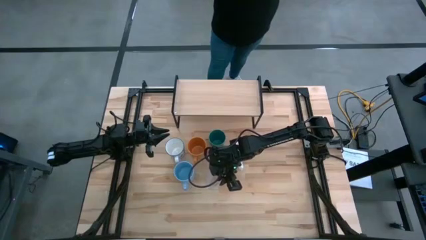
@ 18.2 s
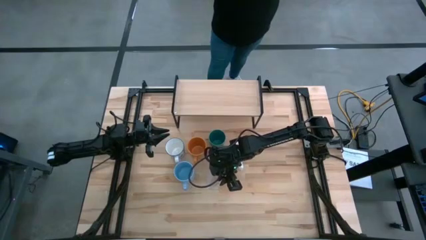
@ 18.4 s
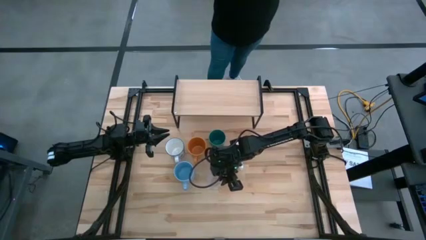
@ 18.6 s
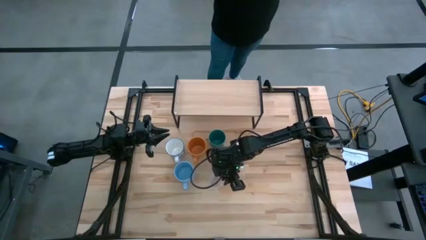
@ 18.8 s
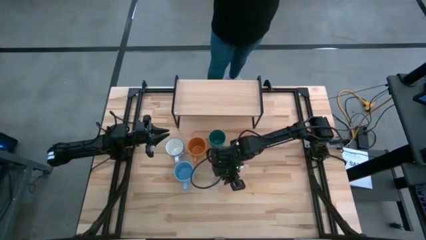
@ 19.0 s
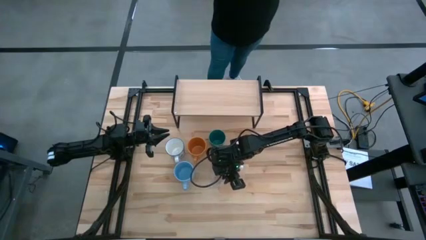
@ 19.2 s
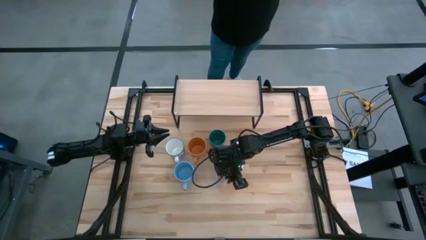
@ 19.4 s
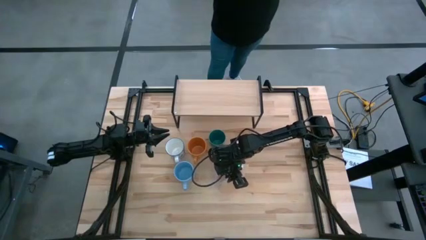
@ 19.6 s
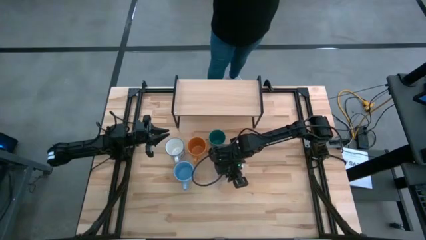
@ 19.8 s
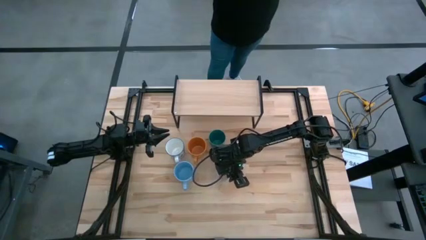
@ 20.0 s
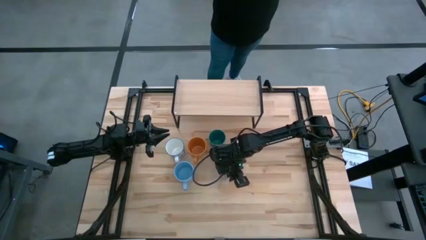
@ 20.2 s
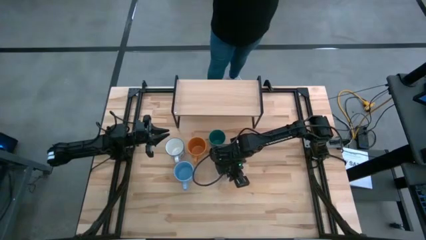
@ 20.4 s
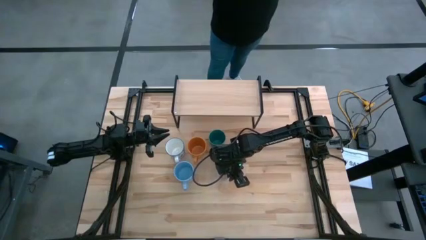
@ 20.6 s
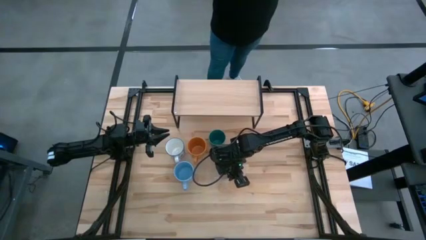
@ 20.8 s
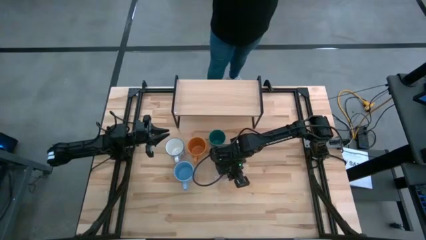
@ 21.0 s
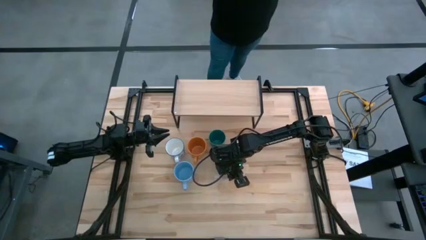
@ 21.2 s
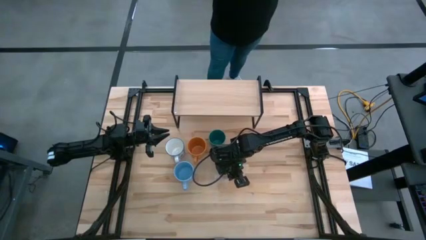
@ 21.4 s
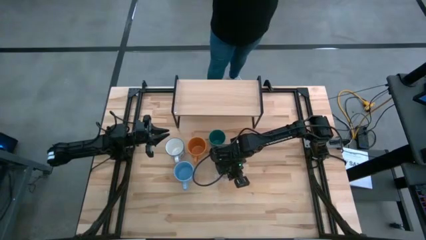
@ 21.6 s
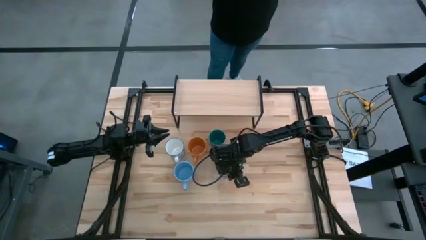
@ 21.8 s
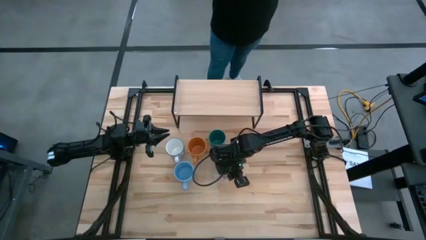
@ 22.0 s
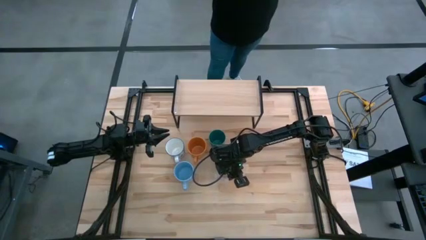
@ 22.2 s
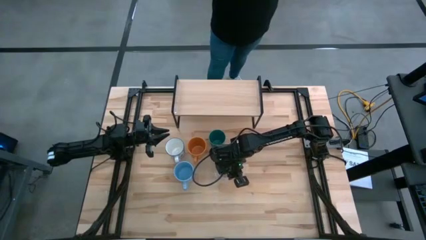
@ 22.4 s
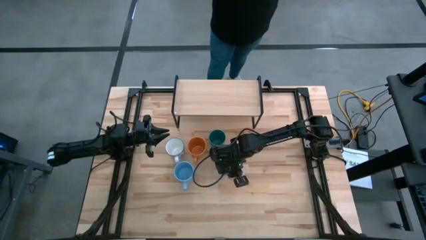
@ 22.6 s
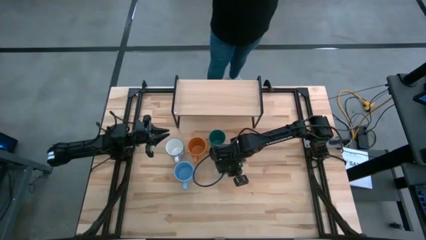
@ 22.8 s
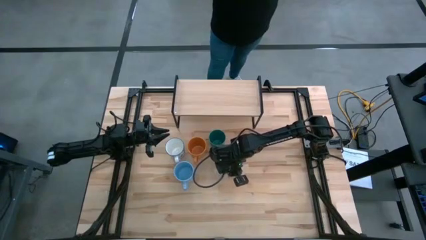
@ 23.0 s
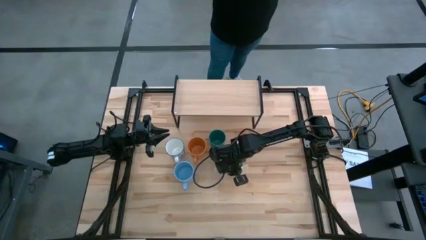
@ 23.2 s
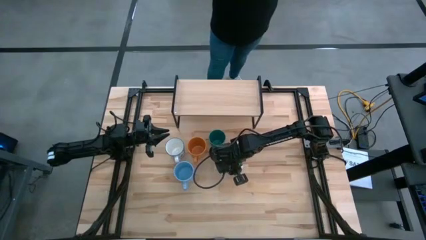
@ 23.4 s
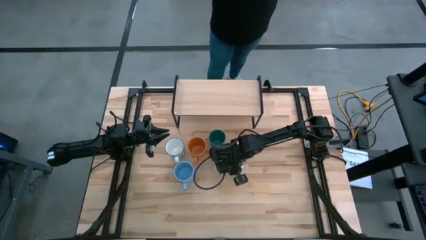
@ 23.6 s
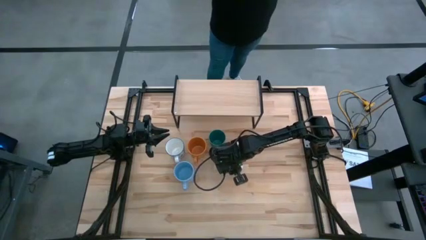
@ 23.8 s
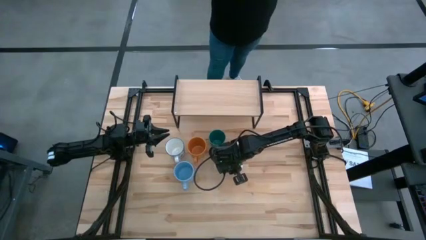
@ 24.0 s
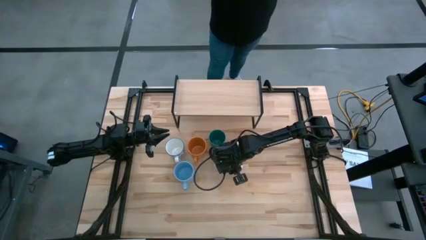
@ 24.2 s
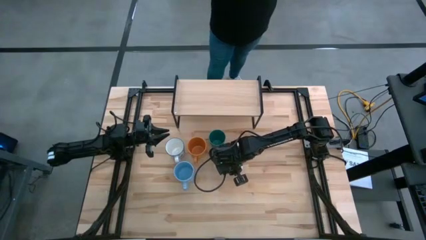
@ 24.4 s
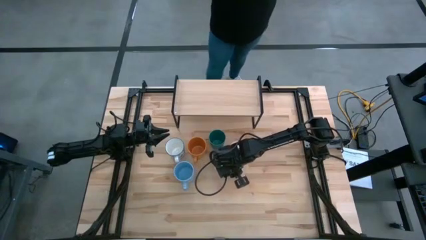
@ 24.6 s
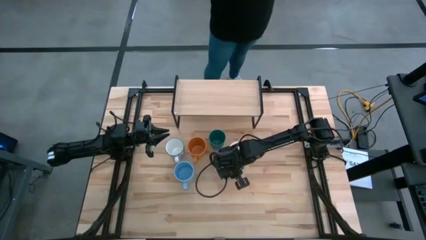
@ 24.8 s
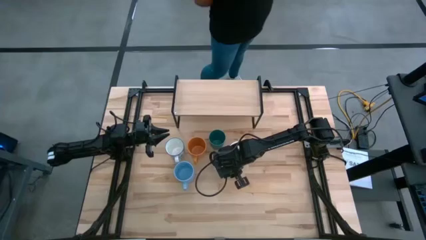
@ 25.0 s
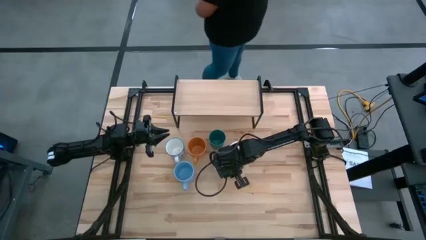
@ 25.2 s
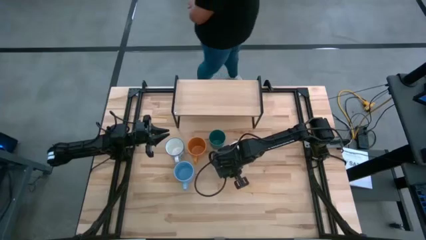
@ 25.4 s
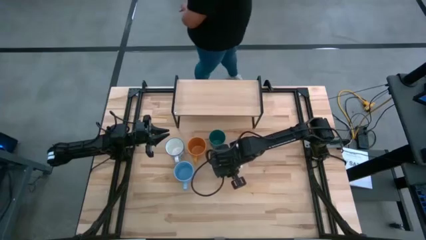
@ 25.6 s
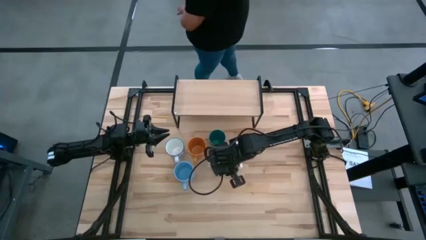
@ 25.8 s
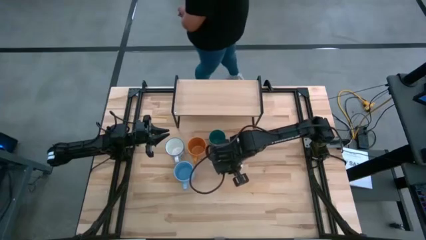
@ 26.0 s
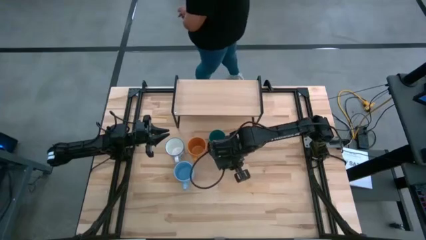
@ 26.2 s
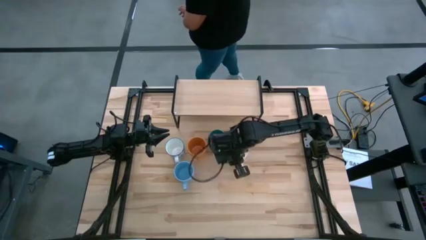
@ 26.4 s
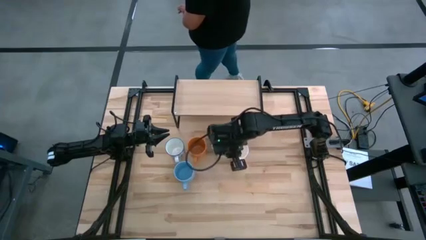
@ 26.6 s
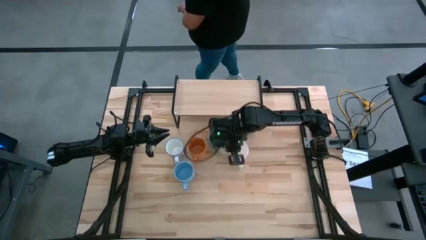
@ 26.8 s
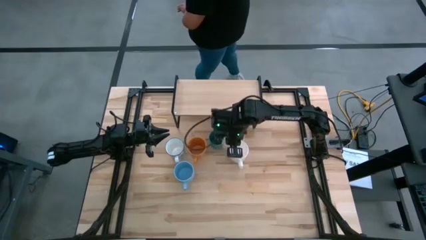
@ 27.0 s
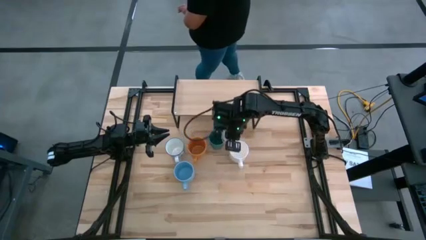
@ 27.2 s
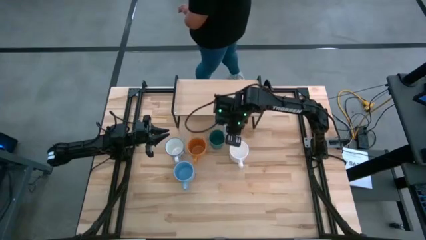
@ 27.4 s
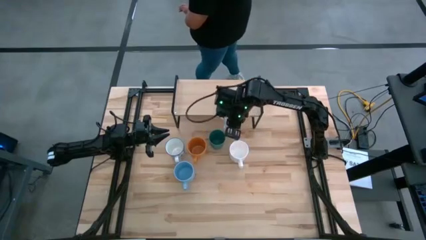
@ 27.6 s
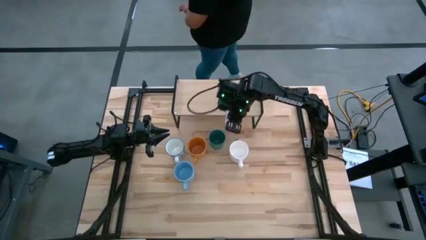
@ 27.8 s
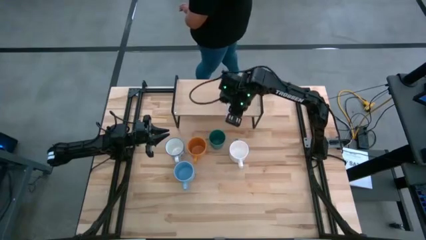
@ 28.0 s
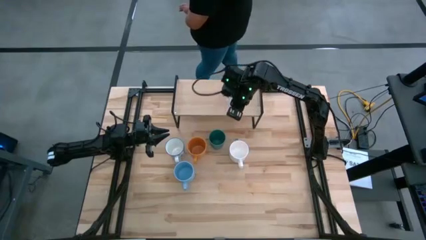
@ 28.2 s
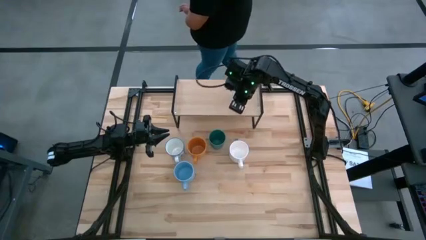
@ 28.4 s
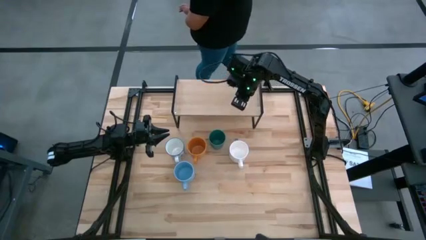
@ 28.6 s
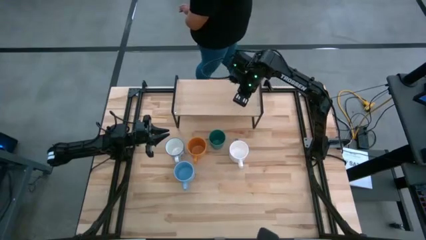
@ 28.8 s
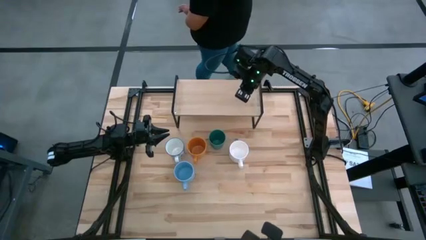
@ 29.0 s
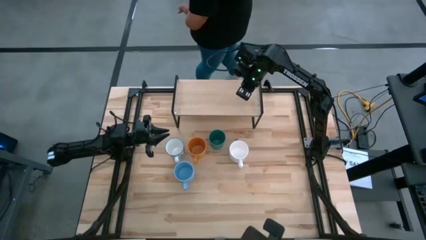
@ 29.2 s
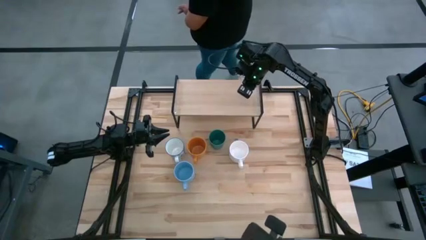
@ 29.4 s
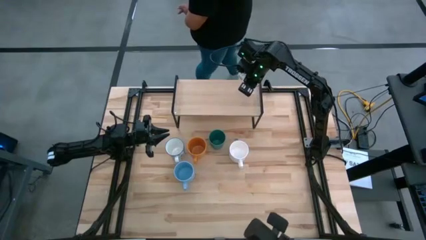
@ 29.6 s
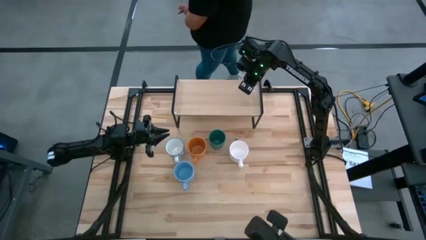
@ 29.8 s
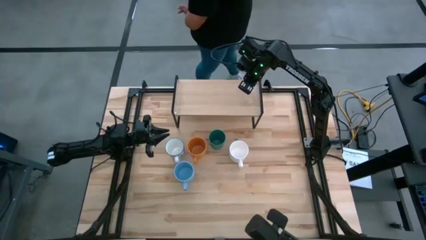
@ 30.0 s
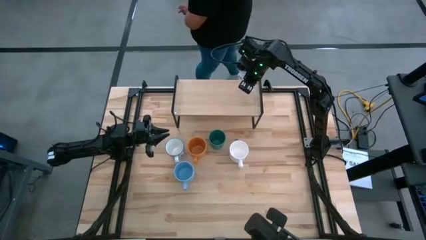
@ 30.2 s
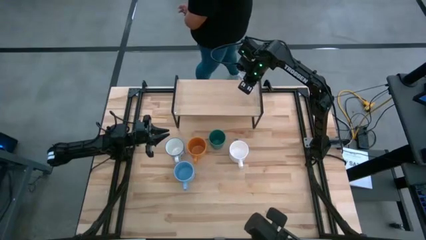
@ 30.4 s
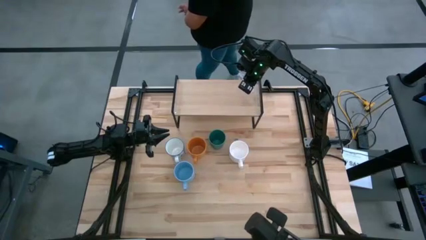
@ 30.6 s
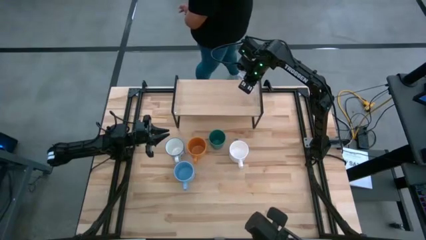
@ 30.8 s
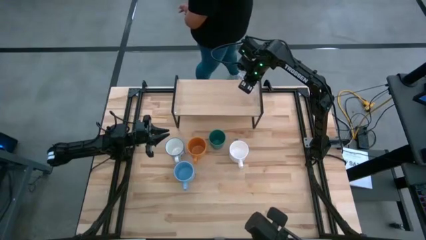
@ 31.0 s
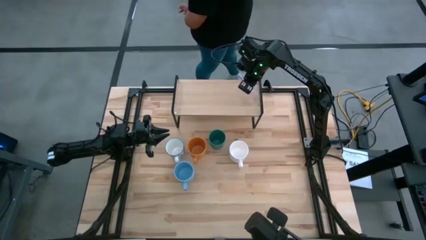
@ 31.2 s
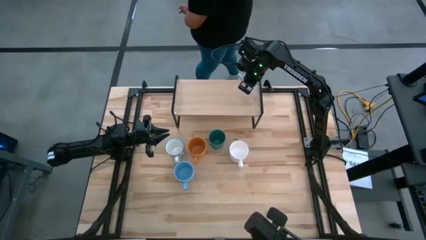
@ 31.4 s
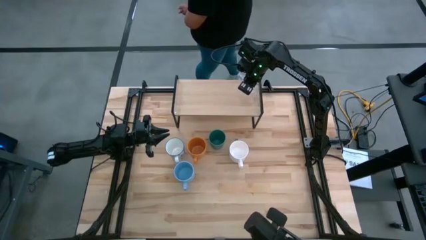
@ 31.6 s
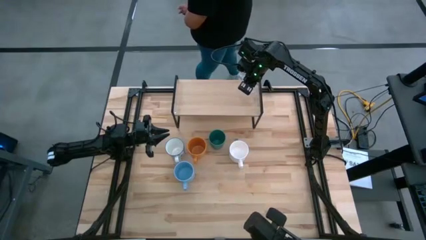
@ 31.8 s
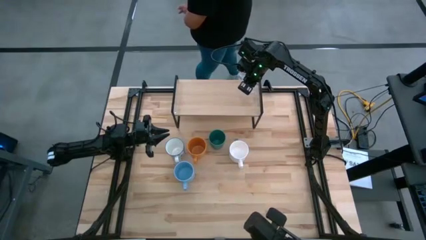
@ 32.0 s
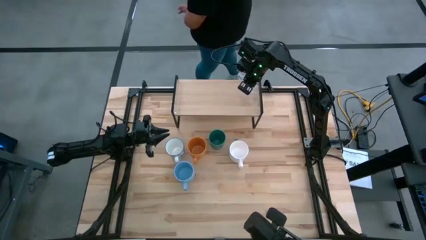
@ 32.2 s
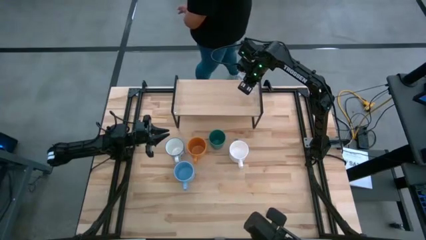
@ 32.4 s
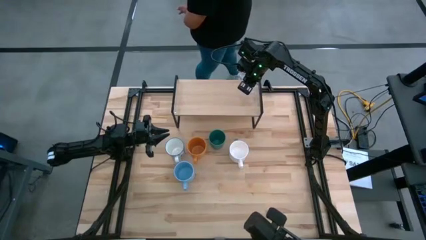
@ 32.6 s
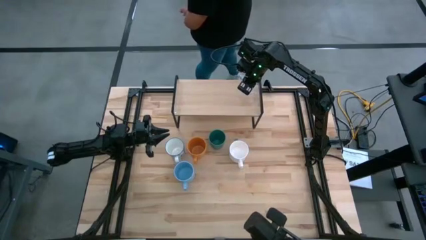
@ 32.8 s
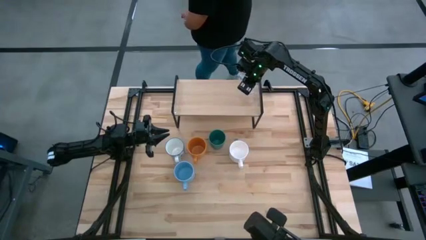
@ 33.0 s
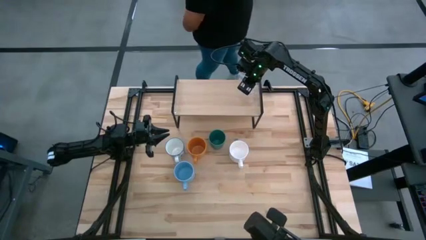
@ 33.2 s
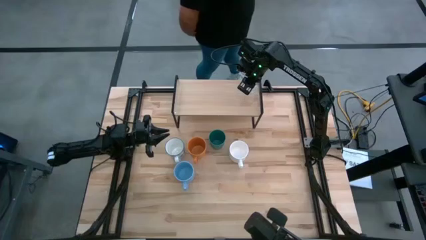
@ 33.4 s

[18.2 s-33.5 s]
Task: Stack small to large cups/mugs on shelf
Put the transparent mug on the shelf

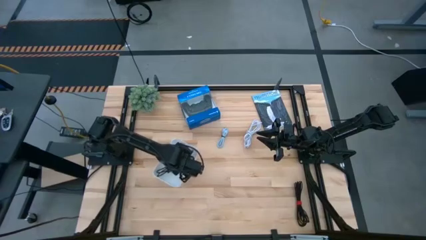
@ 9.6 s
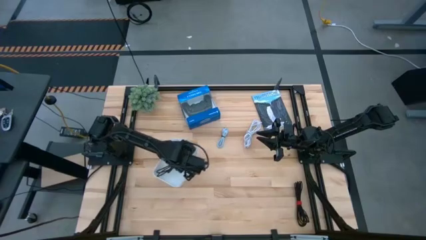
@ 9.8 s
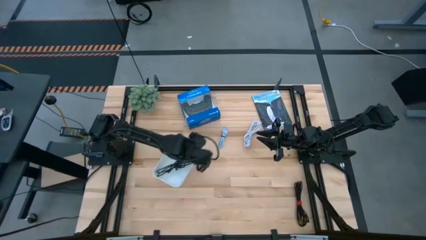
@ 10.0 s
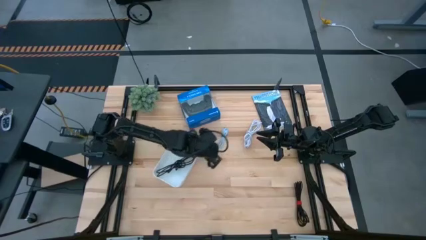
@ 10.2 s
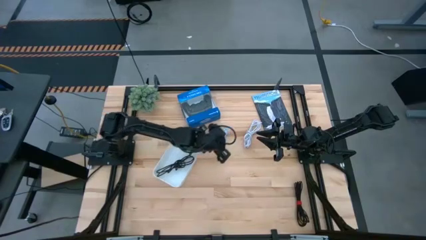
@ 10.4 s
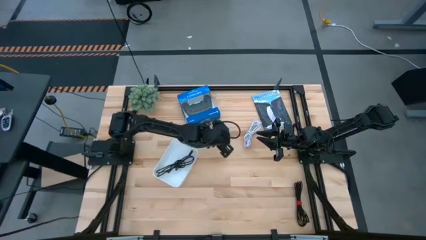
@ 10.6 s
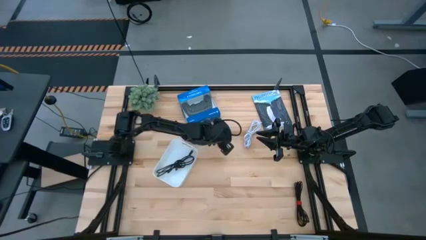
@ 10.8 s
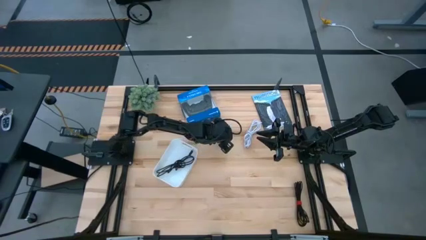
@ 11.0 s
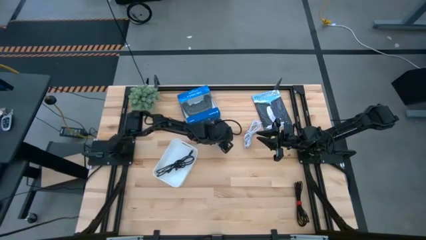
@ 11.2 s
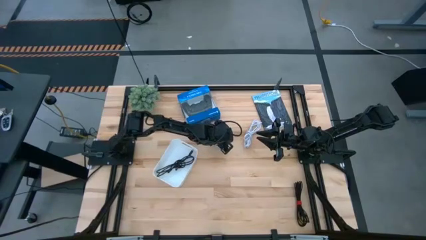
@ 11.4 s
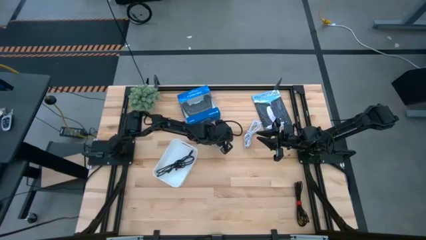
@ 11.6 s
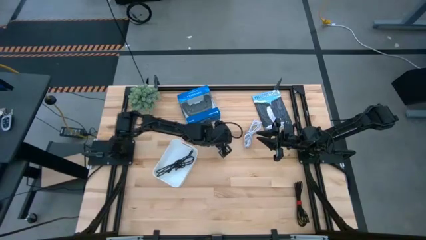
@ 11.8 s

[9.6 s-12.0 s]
Task: Pick and place USB-C Cables
Put the blue charger cable into the white bin
